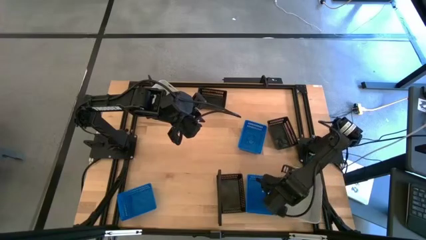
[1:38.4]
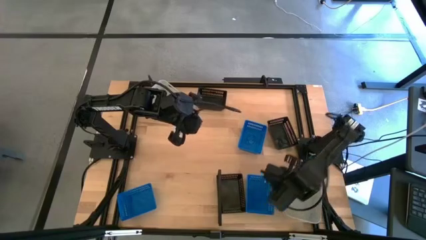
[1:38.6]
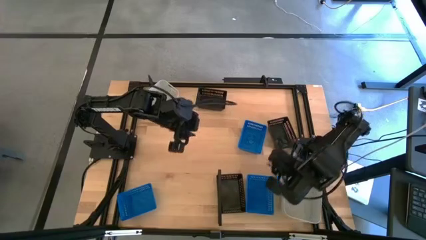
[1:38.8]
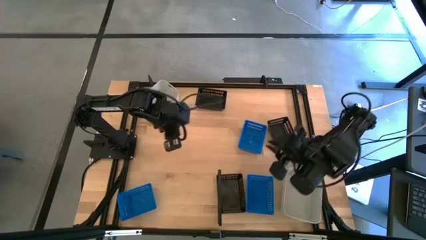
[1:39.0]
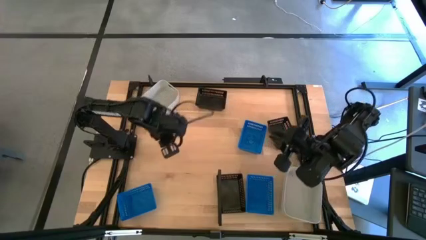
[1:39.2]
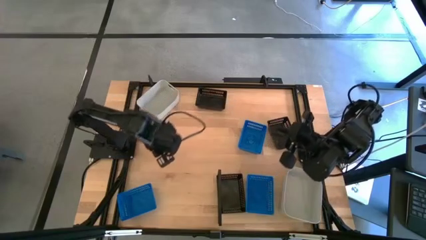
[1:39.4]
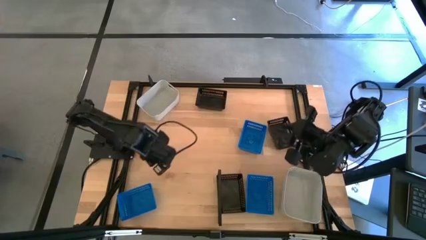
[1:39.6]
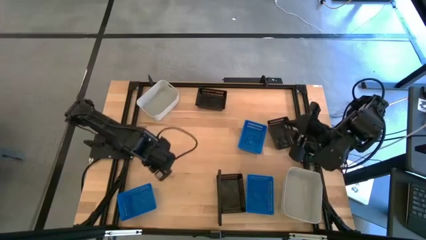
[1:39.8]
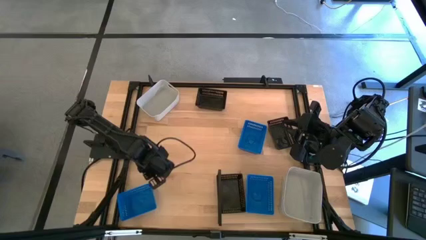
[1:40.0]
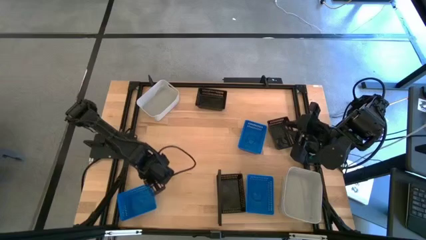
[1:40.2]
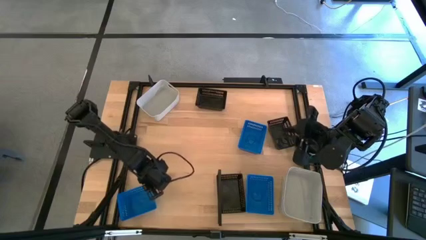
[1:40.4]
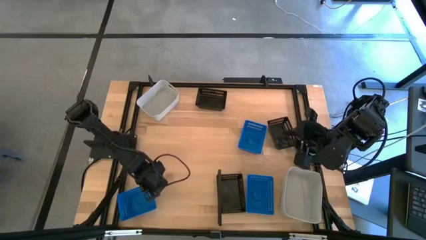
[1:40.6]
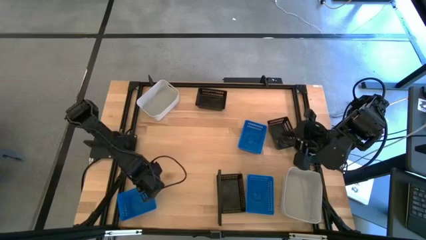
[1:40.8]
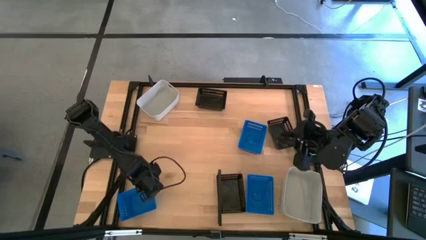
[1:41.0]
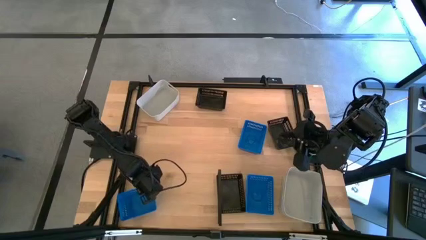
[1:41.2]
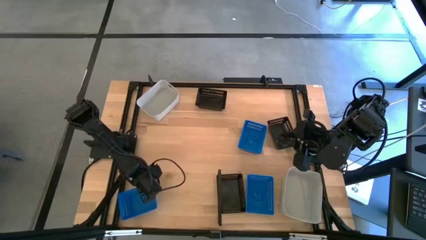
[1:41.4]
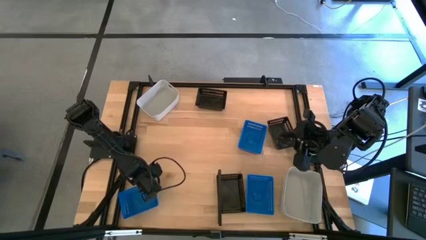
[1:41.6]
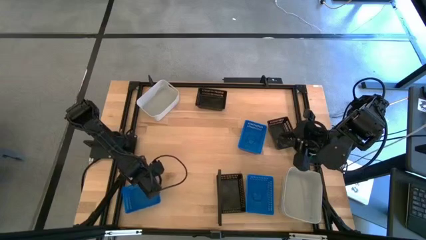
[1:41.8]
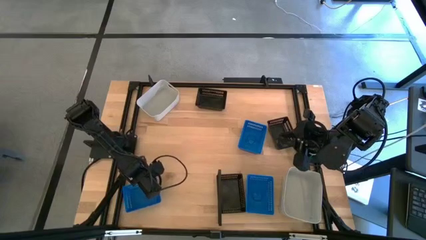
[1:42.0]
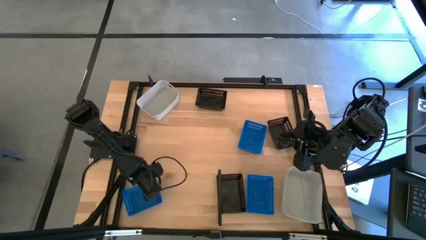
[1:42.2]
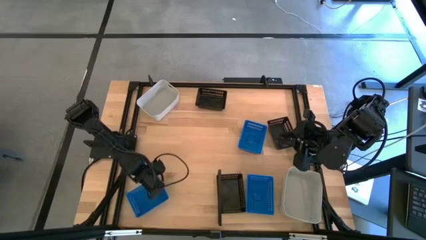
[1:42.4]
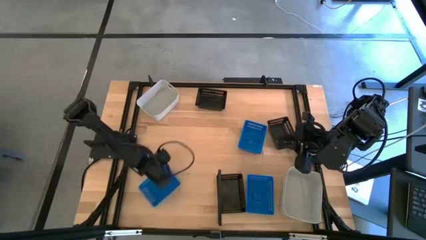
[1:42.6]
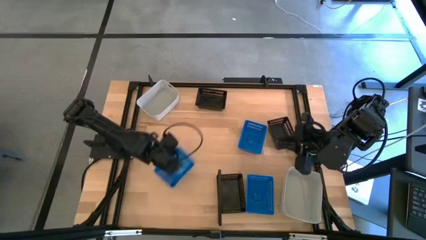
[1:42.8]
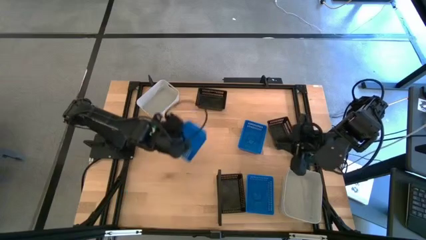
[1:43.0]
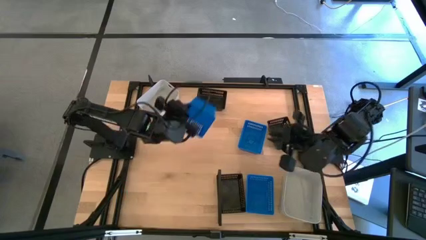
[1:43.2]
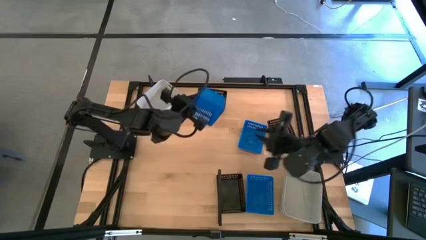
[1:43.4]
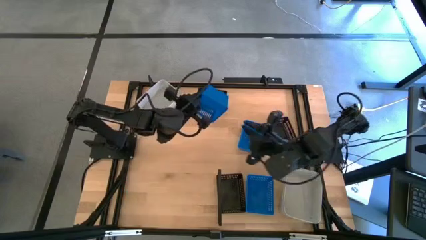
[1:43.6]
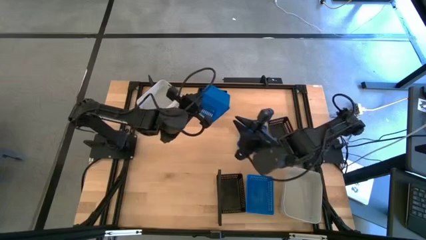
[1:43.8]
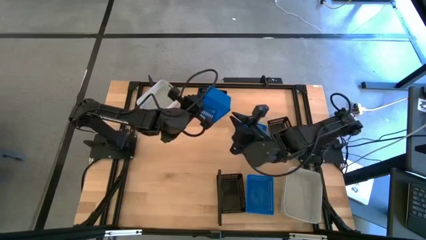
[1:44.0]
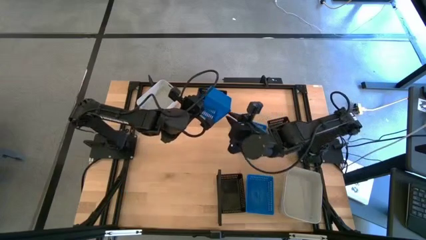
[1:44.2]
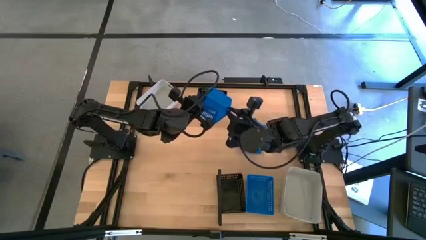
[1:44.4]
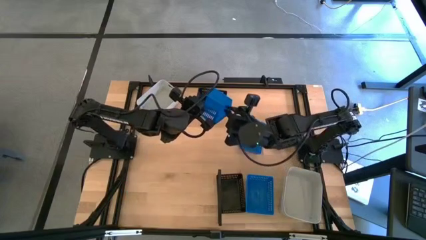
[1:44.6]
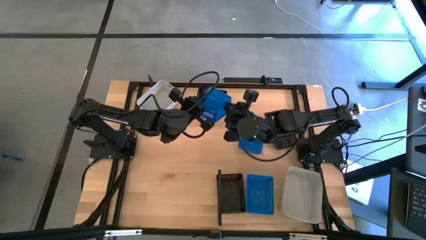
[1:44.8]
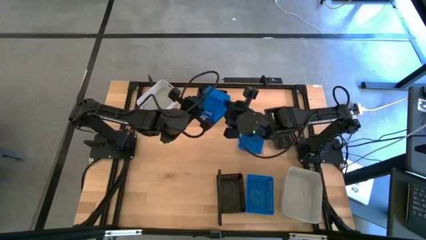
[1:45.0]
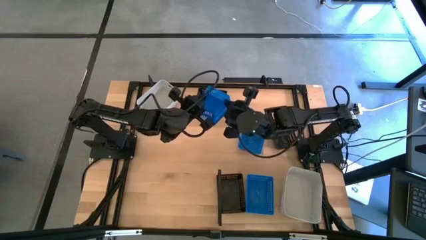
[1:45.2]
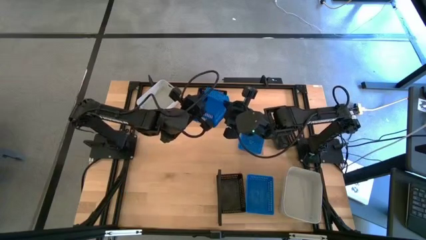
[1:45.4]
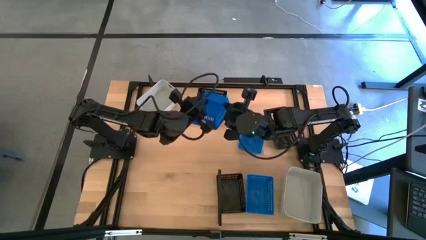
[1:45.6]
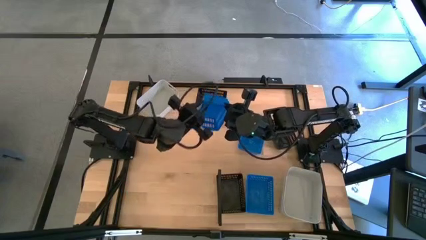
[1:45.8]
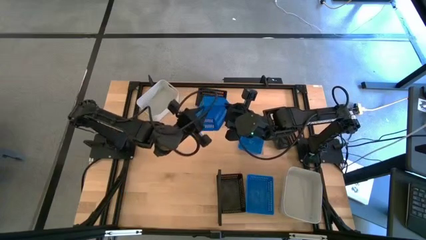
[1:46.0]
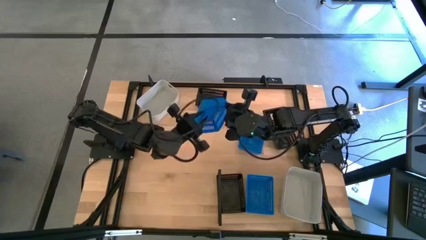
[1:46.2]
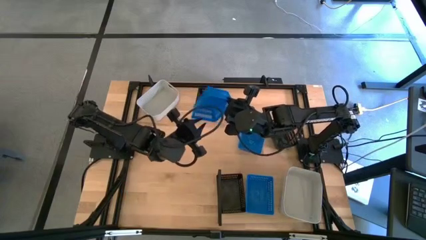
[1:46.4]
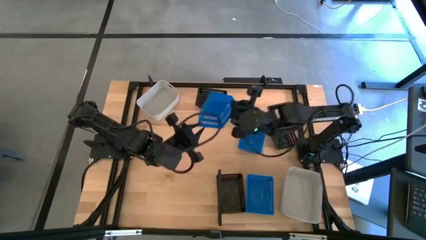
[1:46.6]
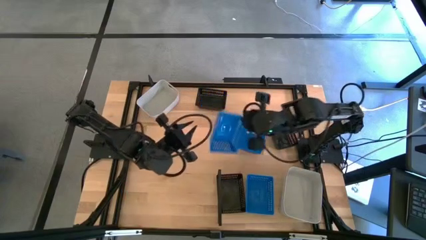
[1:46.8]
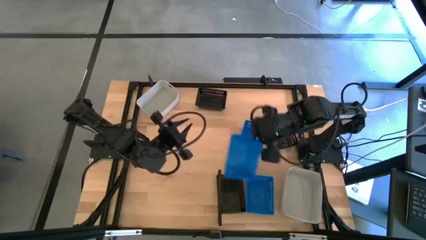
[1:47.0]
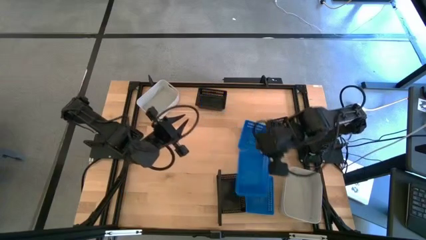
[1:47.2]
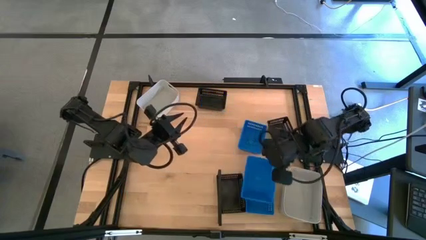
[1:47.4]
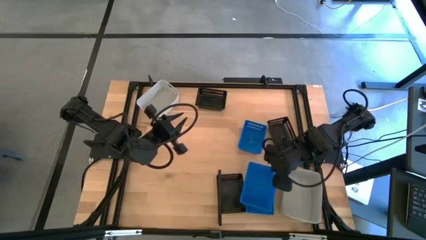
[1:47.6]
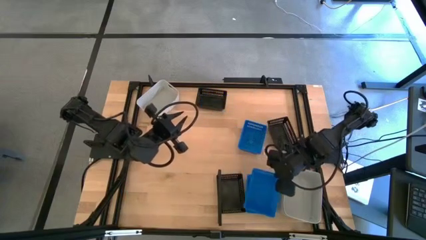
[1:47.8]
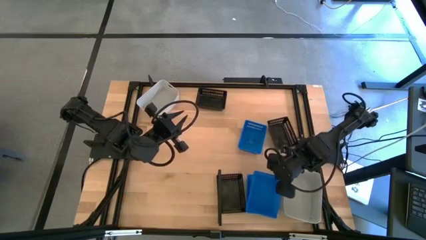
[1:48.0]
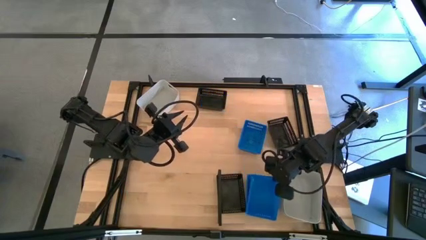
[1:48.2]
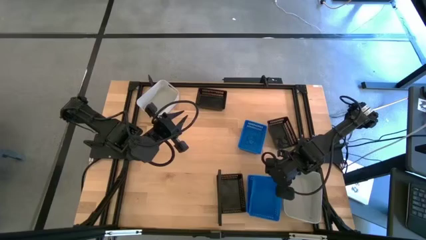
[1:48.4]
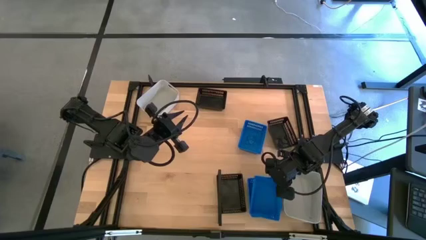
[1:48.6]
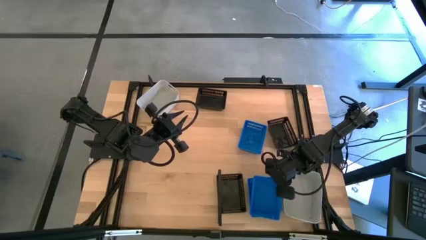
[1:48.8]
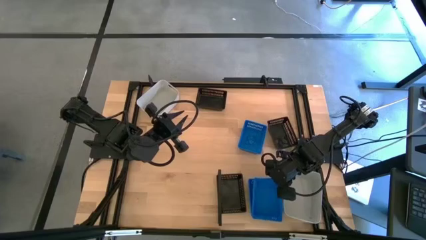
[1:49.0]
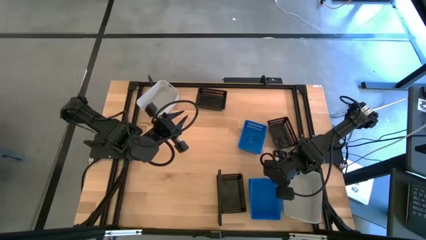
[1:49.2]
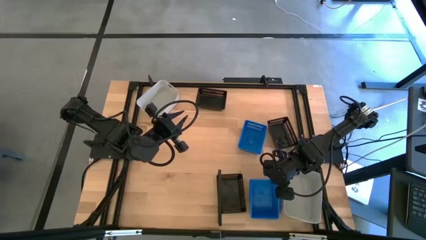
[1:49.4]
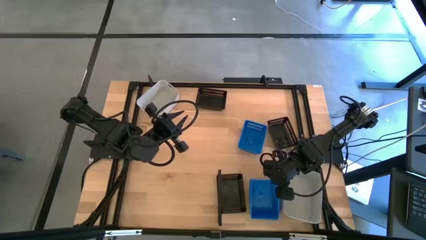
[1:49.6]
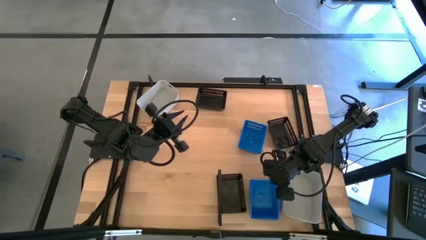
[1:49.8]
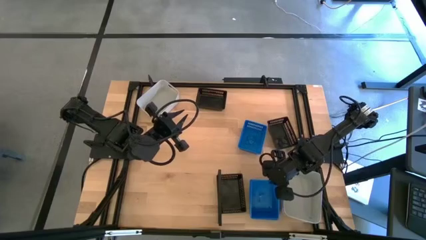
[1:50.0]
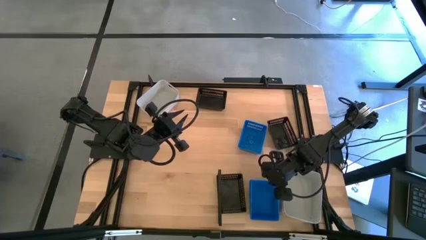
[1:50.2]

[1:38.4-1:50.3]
Task: Stack baskets on shelf by color
Stack the bottom blue bin on top of the blue bin on the shelf

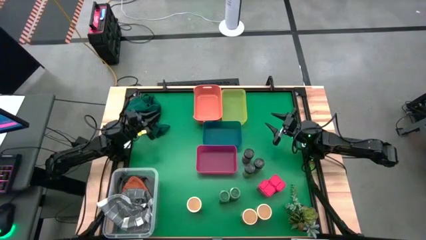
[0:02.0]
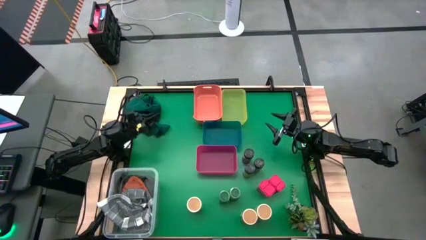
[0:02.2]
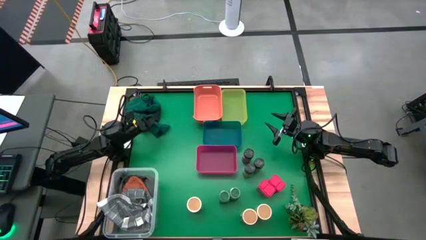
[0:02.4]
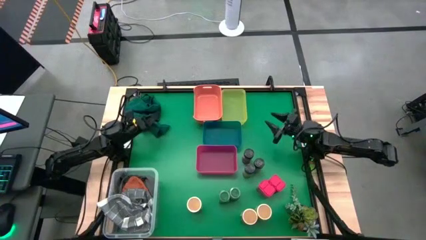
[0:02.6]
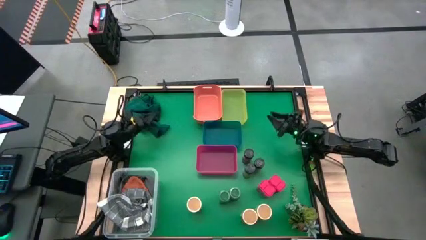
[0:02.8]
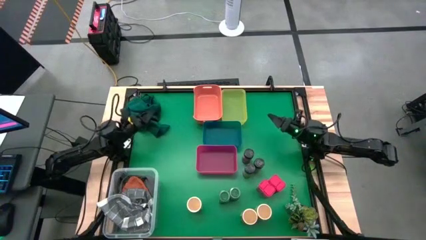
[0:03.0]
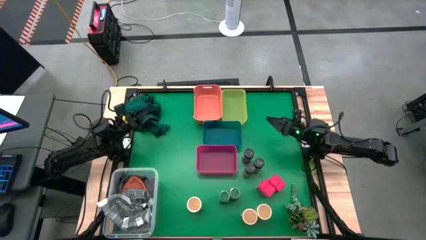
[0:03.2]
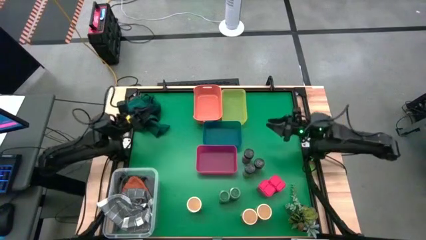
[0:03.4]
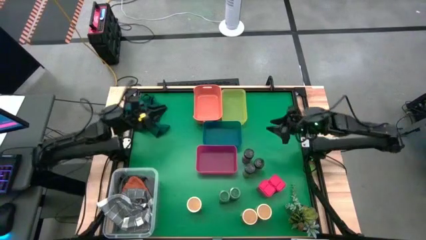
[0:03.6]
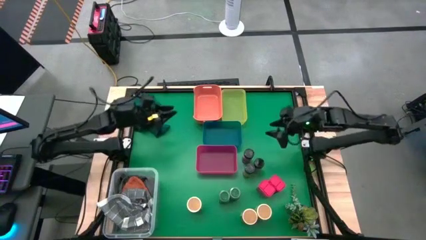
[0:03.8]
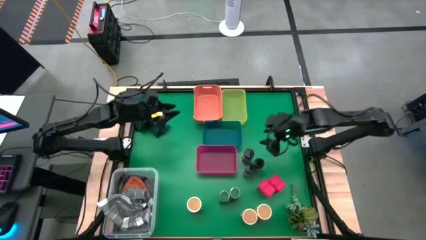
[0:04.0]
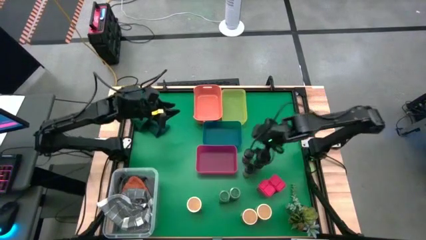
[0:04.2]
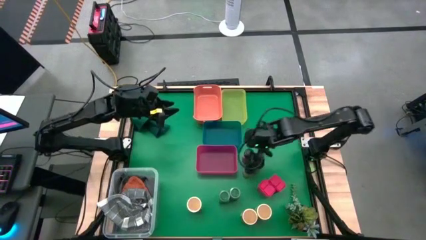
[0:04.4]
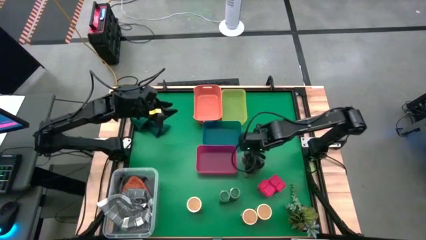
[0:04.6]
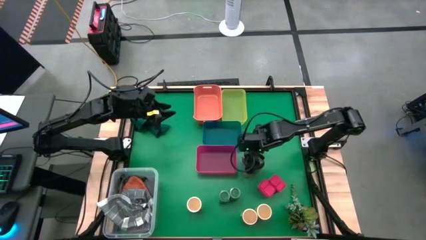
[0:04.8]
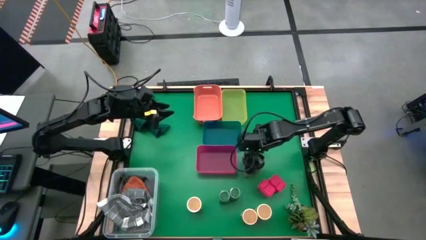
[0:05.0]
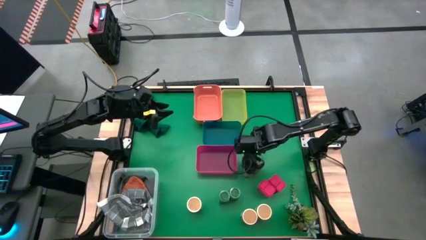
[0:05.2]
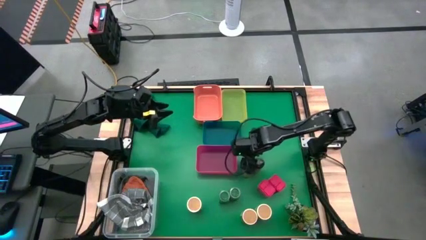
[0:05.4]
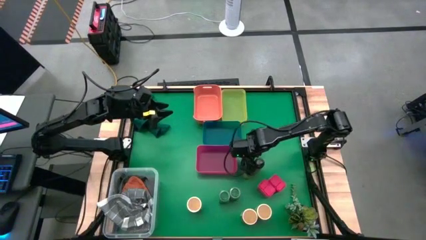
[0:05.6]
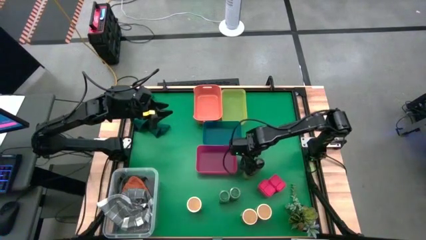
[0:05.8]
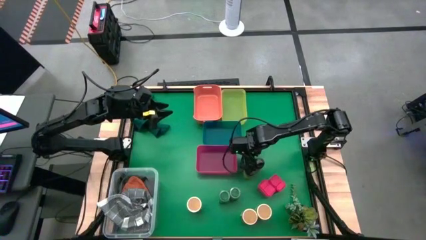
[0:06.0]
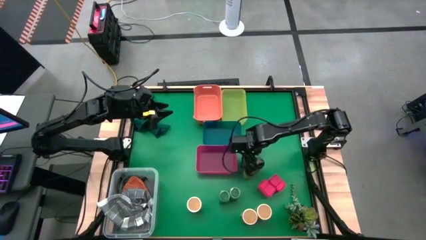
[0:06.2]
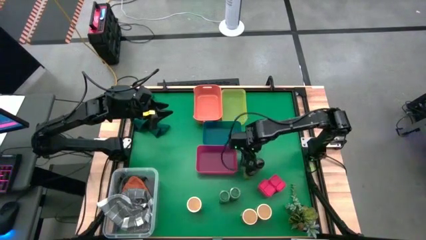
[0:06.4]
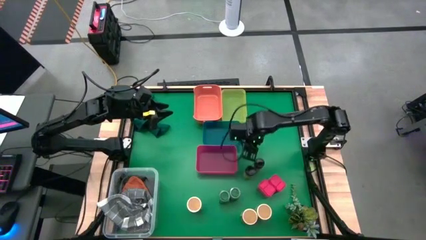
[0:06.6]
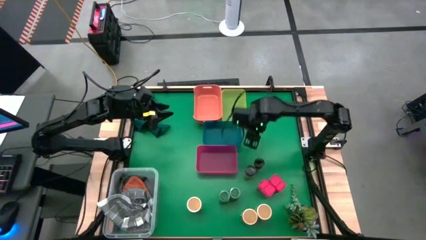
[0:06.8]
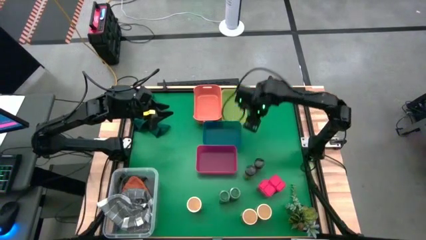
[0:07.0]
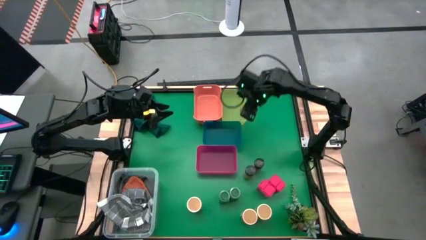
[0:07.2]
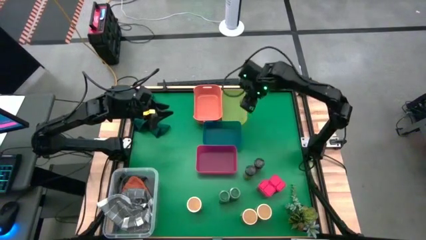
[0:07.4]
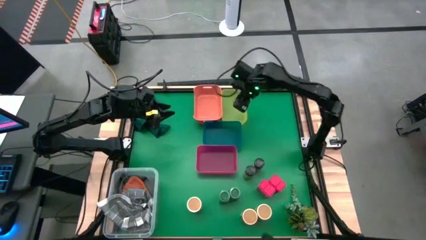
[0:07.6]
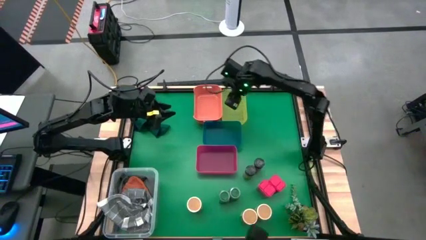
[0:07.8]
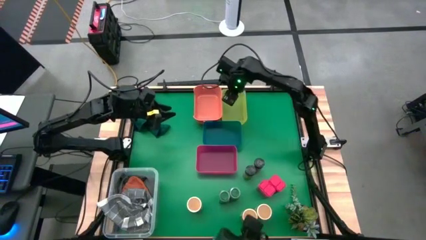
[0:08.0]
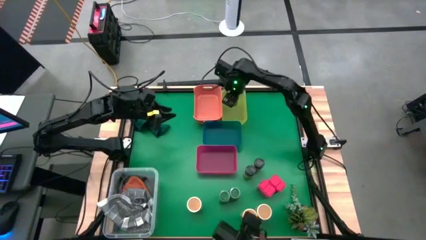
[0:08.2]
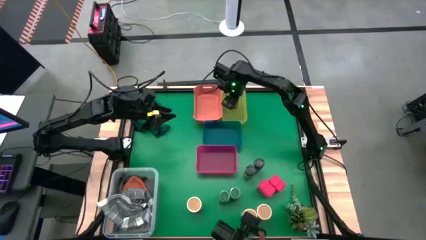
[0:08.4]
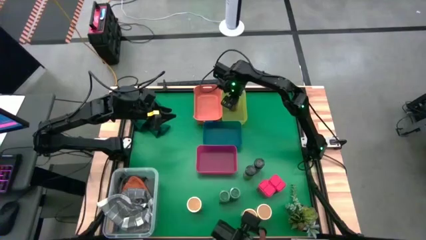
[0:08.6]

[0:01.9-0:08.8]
Task: Sort spices by type
Put the top black seasoning bottle into the yellow bin
